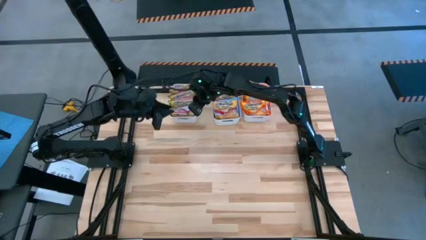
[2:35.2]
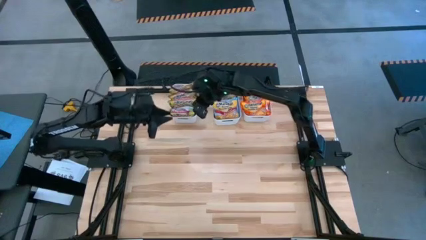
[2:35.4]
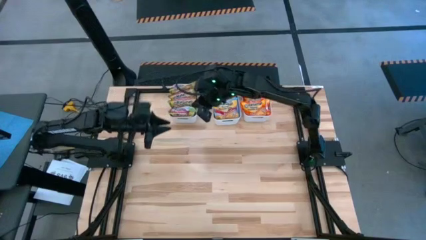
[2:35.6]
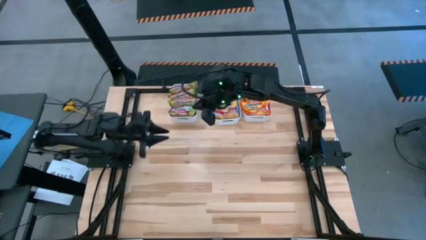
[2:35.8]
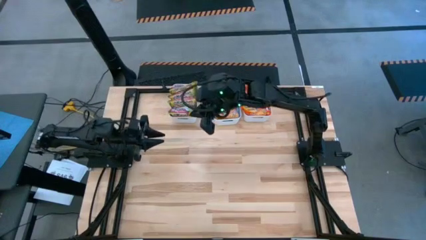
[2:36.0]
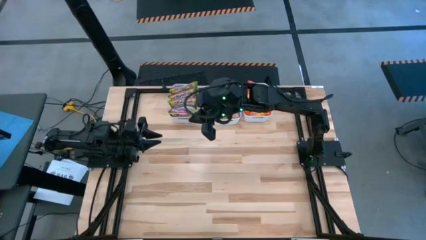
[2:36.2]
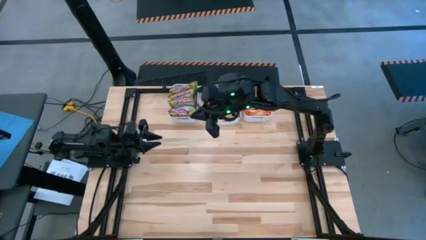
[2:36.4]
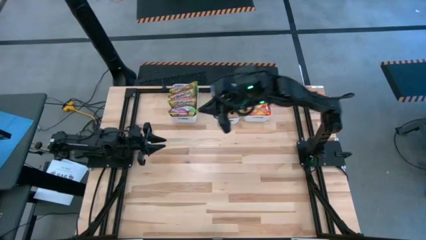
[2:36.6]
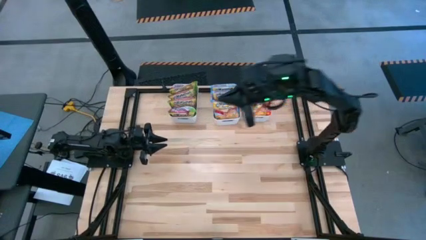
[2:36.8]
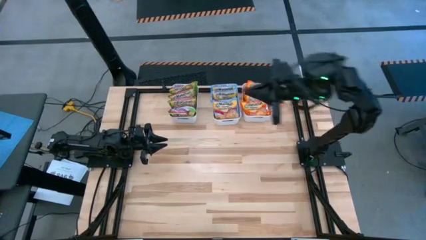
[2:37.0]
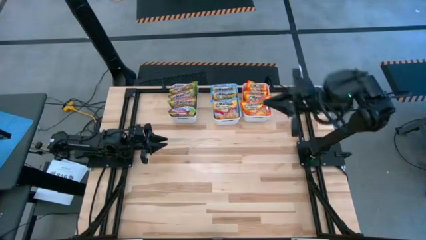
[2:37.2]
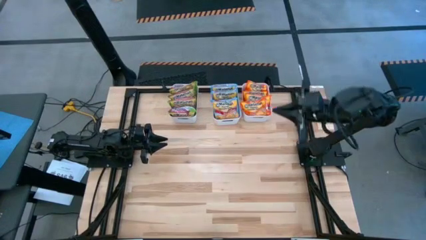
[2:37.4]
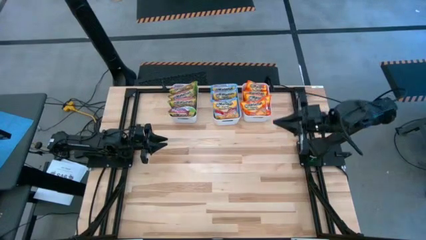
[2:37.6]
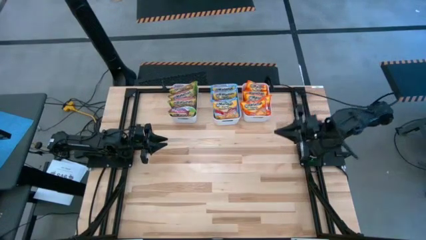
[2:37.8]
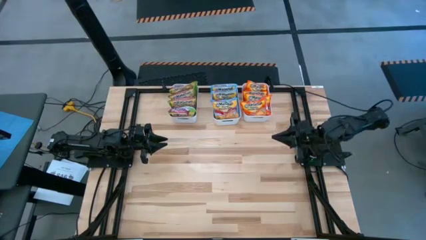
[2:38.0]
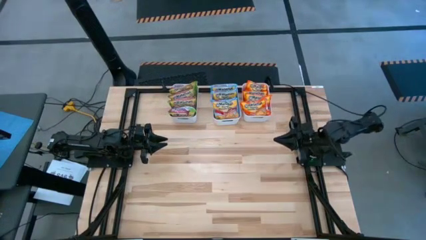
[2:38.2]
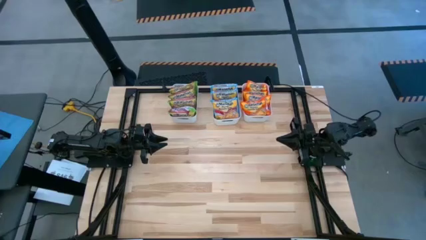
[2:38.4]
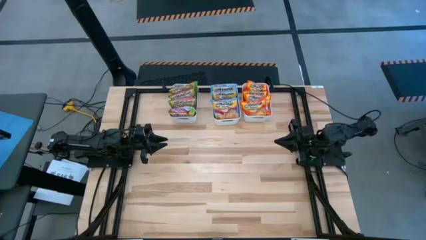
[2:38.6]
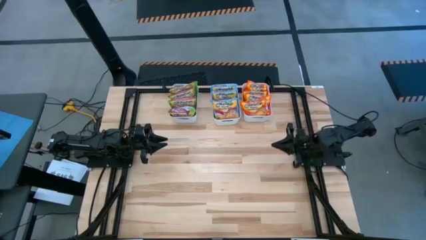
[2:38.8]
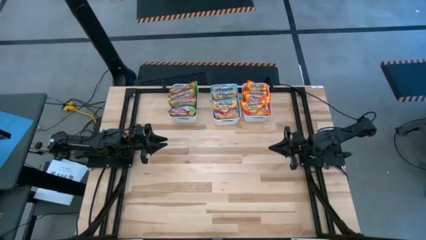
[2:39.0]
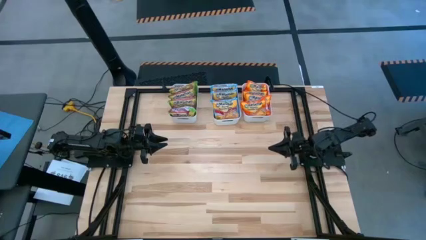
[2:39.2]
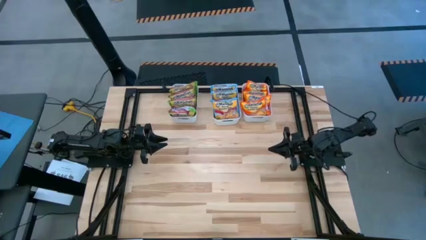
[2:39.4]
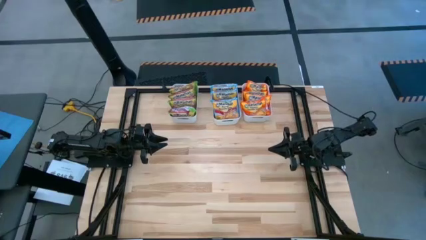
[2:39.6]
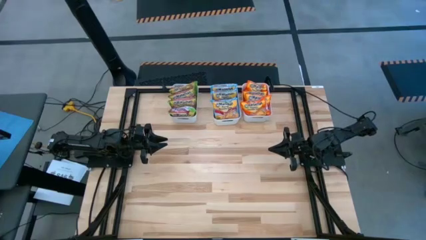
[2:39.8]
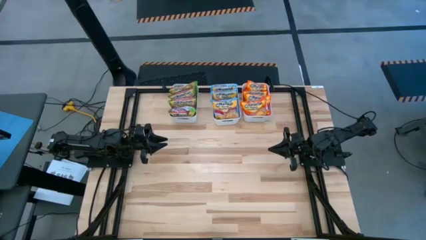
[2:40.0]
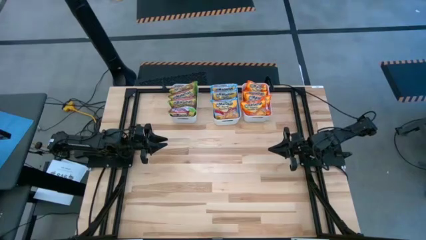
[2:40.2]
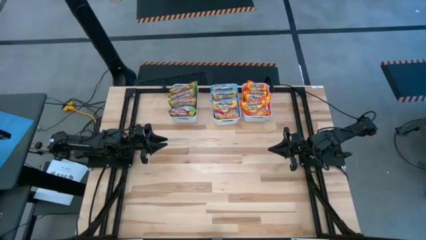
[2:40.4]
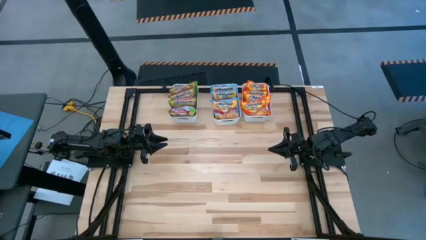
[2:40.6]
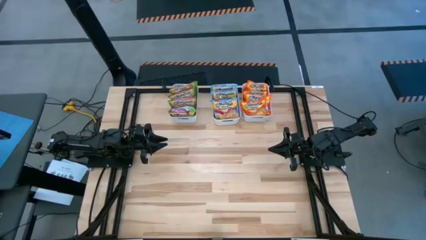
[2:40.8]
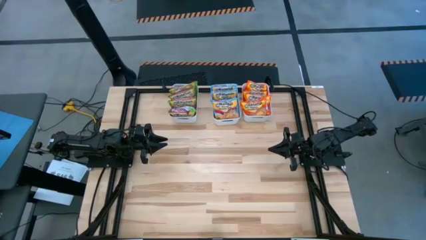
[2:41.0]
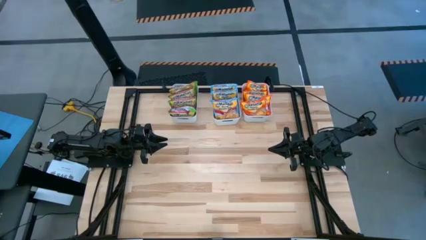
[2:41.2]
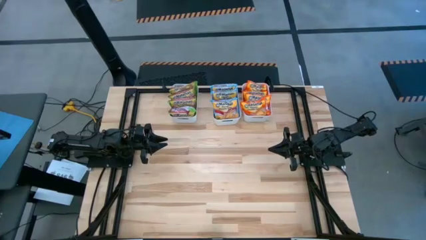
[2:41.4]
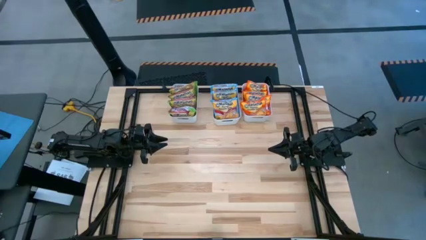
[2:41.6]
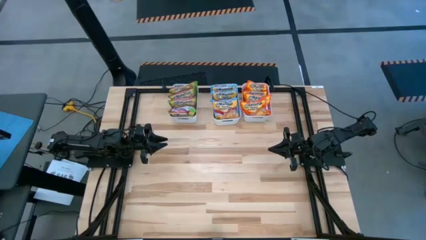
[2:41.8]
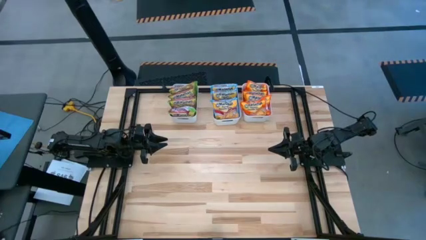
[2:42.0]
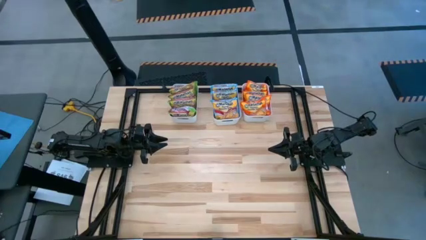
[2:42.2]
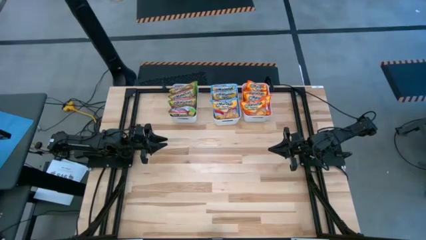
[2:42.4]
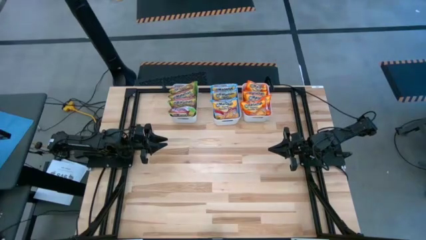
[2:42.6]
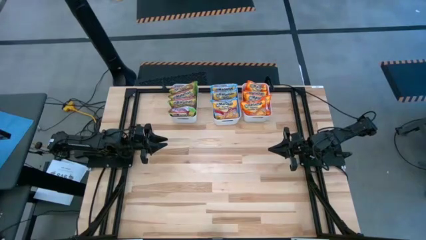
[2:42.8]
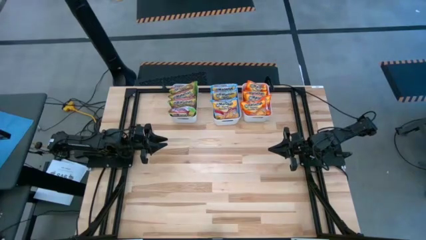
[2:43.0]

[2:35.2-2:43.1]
Task: Sort Maruchan noodles
Return to Home Position

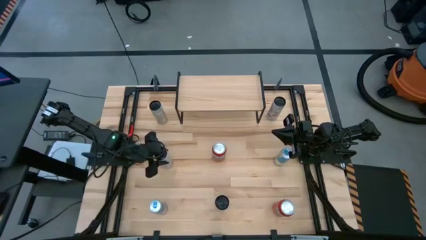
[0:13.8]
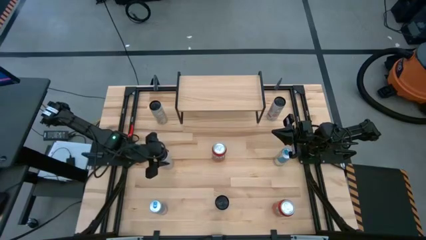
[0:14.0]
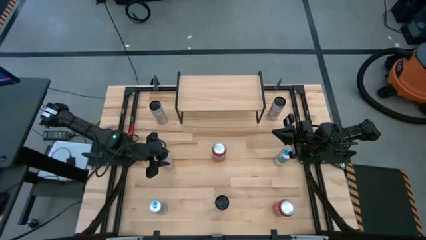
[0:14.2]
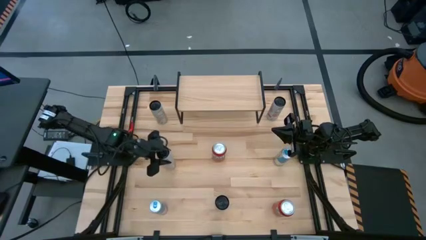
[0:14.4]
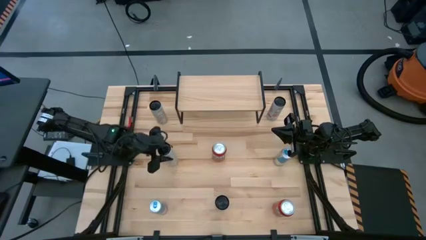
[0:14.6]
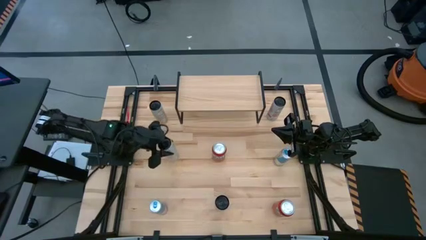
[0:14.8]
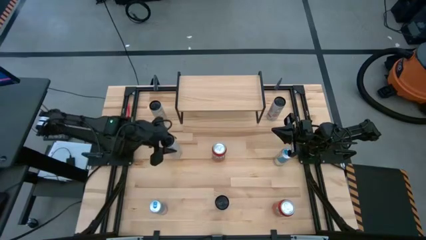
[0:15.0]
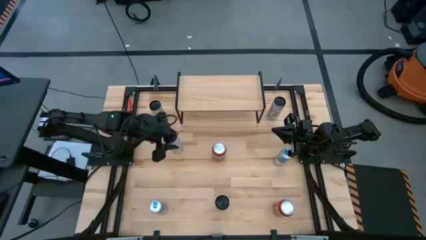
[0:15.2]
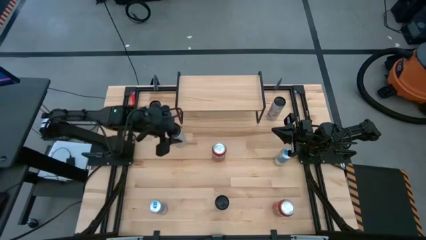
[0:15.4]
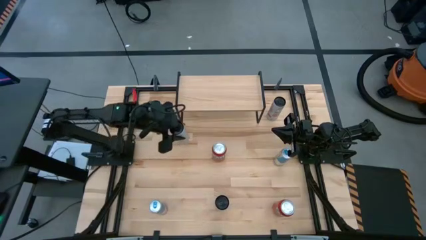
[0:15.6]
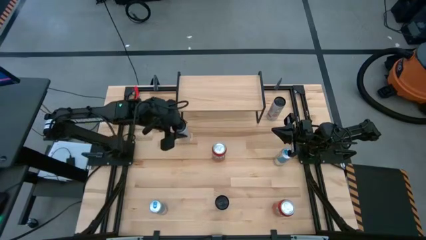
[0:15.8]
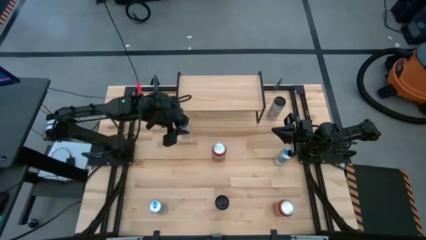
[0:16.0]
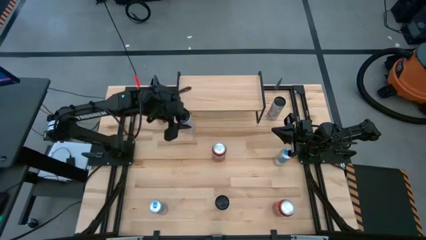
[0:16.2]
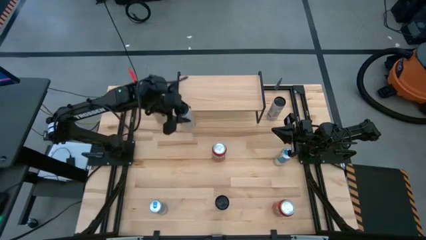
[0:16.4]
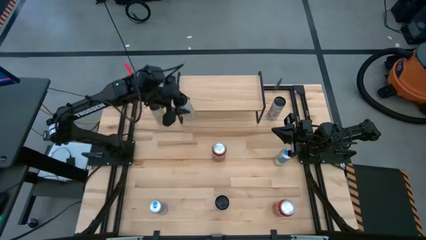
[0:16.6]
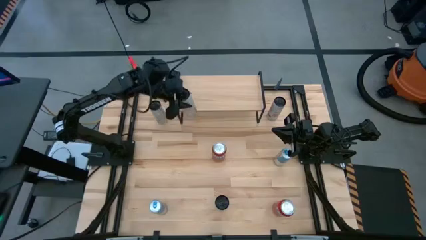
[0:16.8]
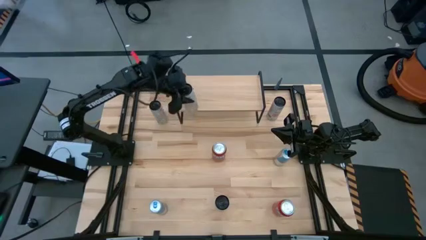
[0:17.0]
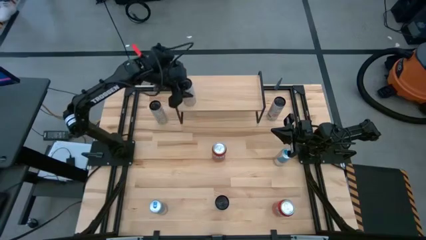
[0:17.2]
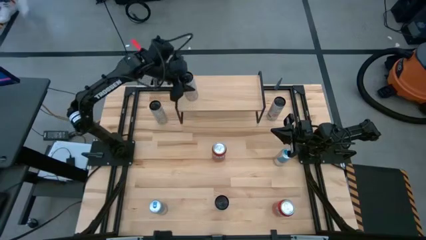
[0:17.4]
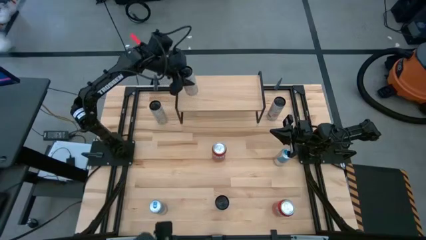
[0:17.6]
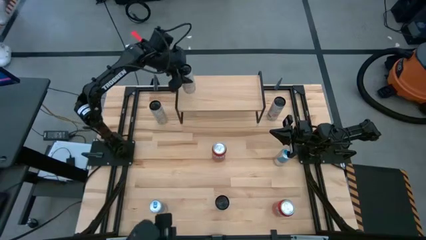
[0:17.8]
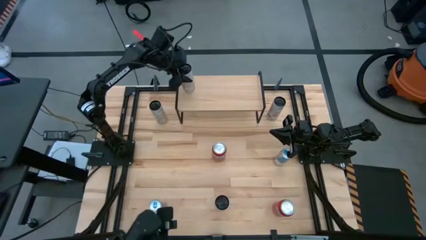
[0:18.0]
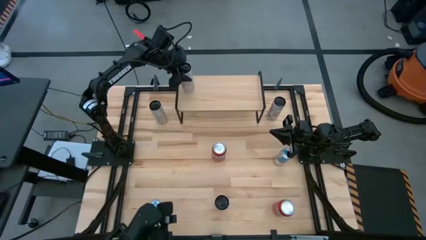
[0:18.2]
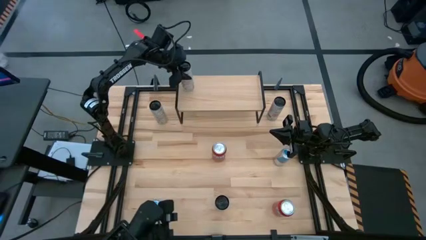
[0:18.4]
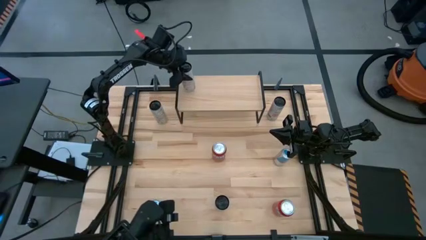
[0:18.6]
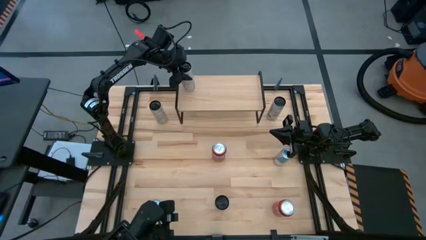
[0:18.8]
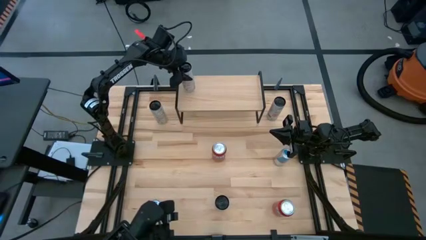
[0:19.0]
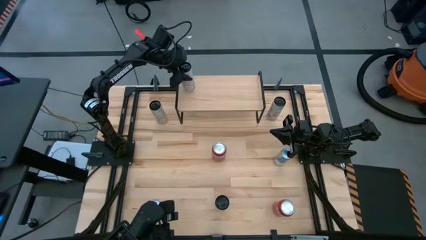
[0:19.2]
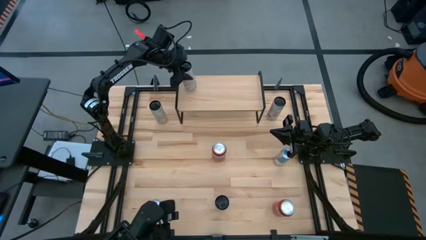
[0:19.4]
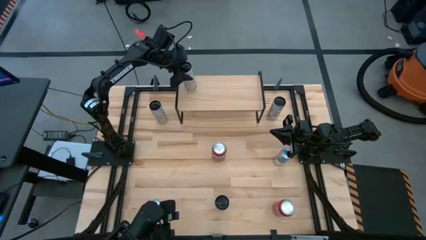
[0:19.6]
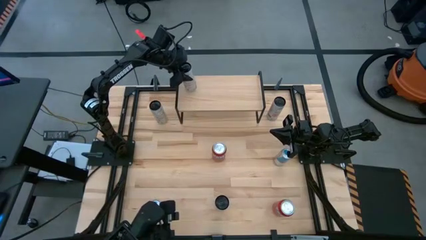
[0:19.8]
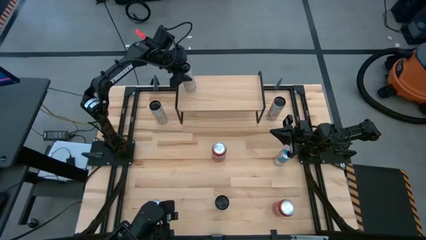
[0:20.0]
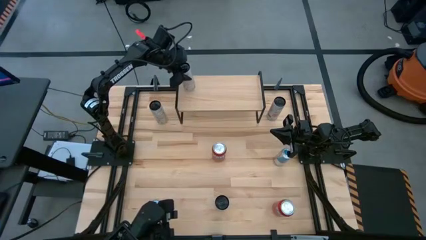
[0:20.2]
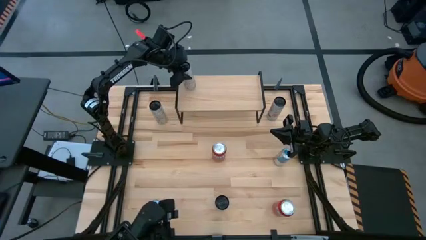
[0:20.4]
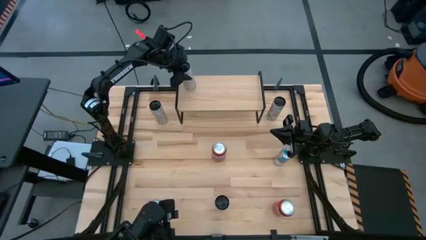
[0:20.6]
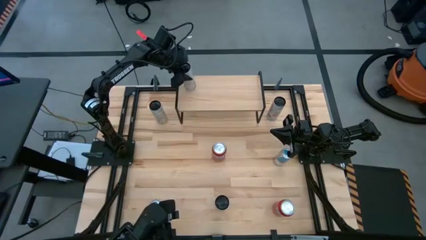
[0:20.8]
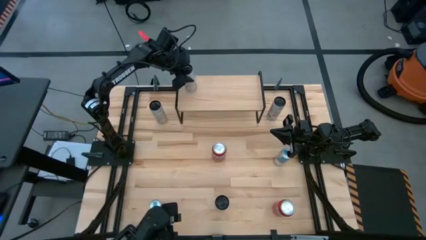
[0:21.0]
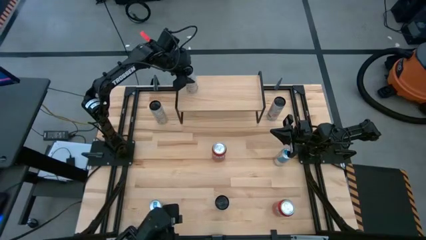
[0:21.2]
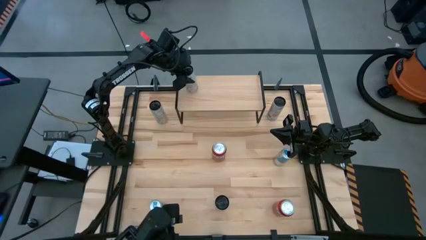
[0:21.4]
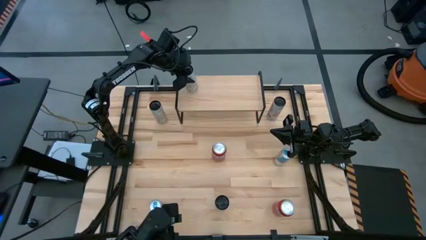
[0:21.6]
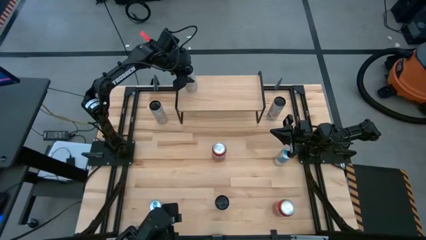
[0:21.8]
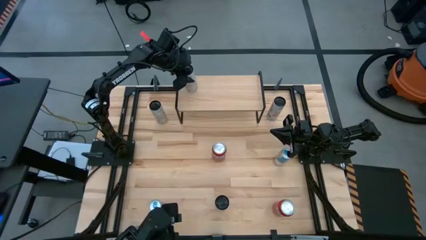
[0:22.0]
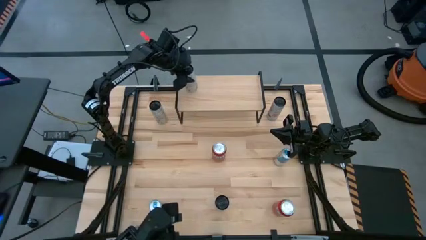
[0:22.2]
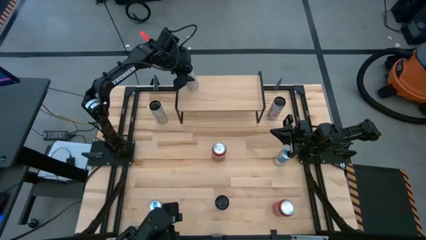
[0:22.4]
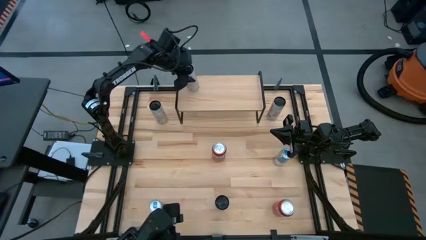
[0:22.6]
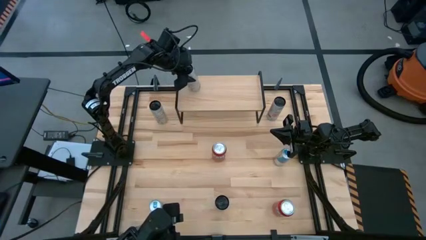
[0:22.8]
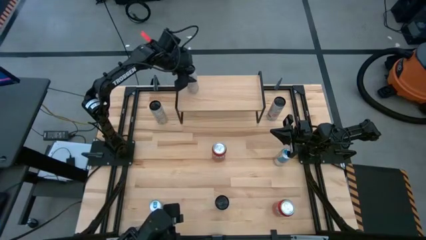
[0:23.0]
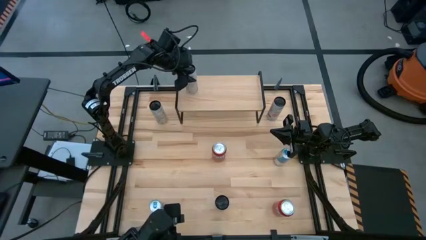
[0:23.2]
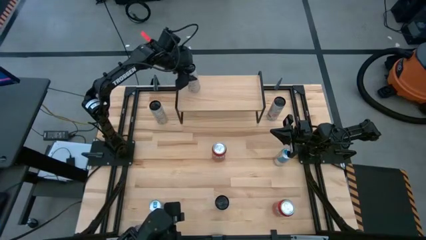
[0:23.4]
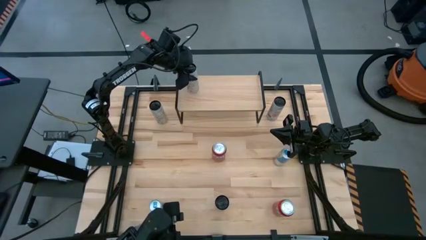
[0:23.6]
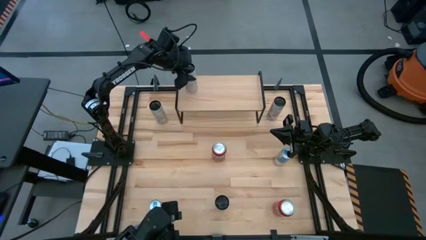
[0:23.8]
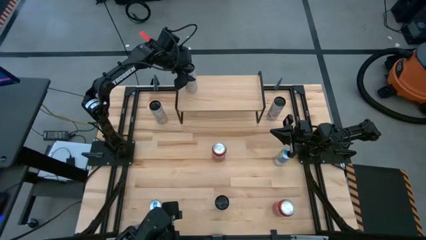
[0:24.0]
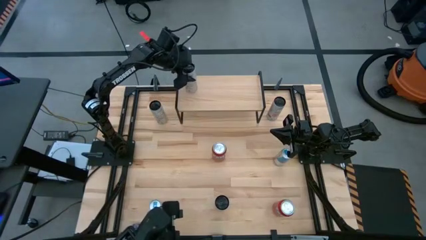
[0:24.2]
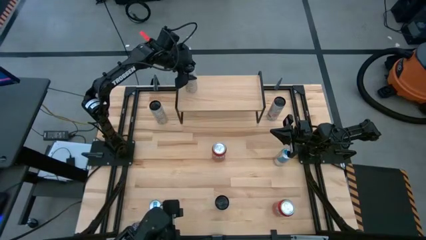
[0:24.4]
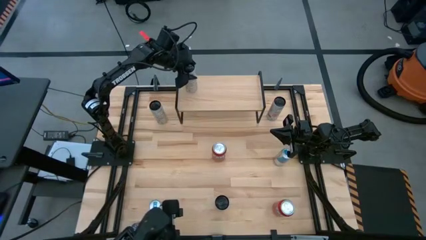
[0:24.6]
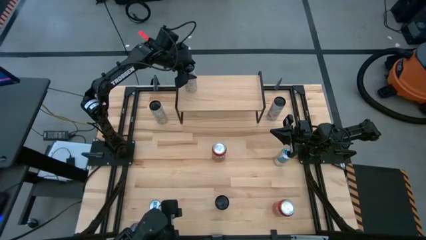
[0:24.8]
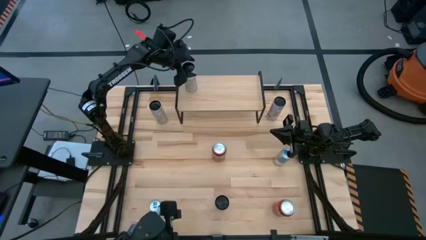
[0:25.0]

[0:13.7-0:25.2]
Task: Place canned beverage on shelf
Put the bottom white yellow soda can on the shelf
